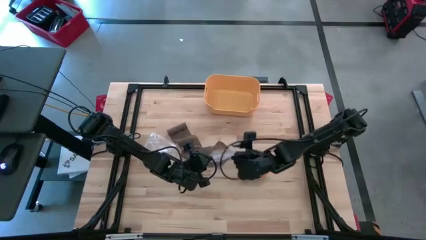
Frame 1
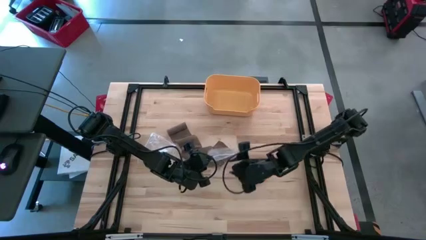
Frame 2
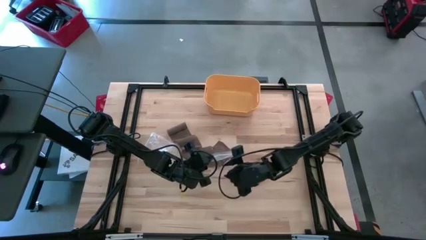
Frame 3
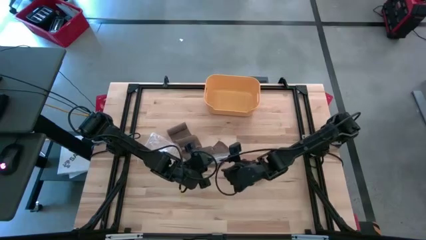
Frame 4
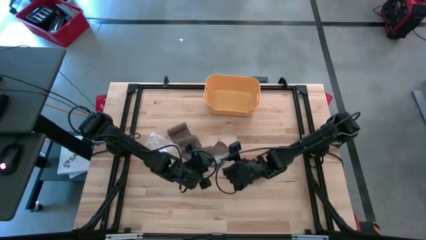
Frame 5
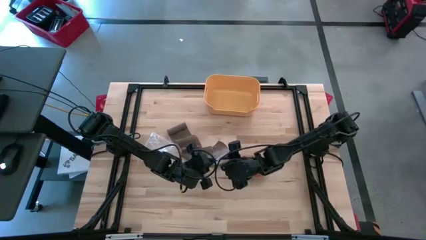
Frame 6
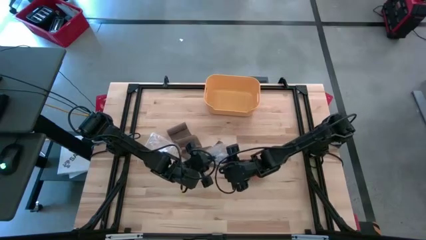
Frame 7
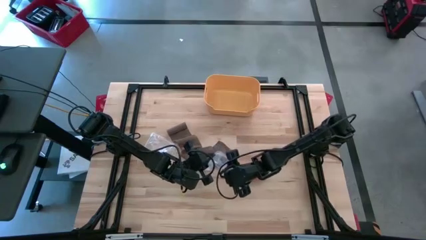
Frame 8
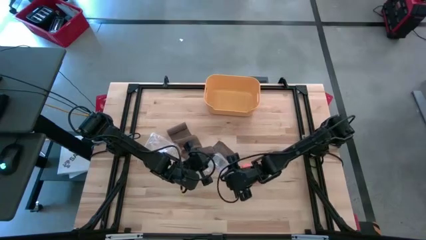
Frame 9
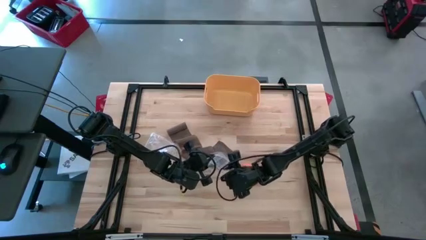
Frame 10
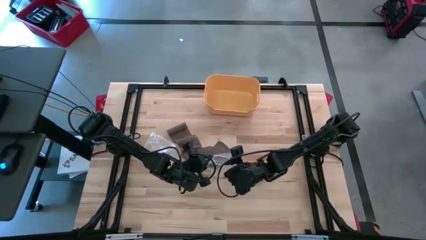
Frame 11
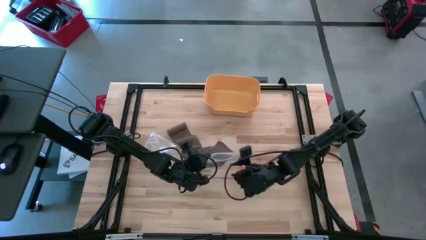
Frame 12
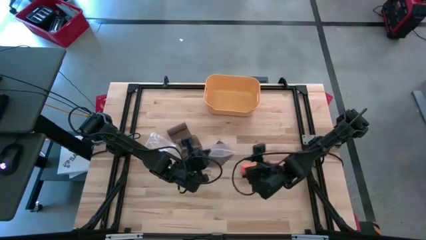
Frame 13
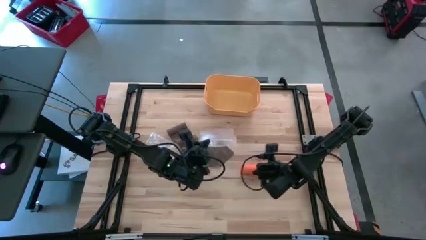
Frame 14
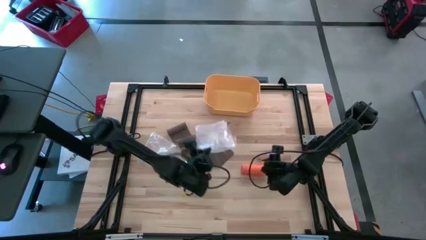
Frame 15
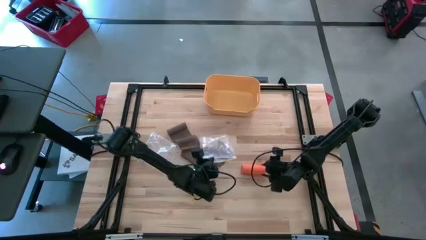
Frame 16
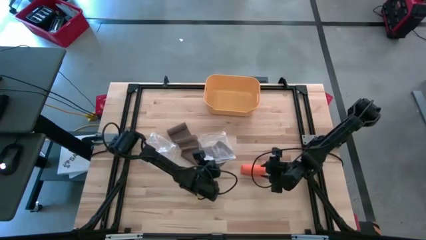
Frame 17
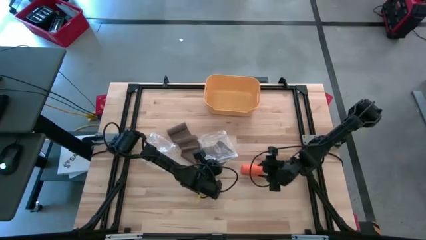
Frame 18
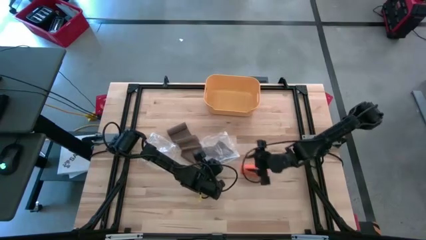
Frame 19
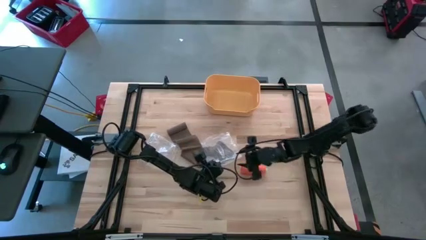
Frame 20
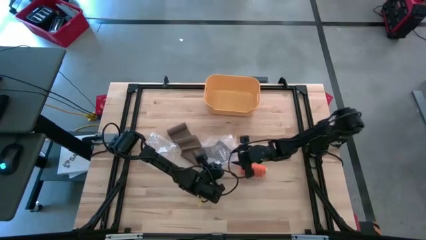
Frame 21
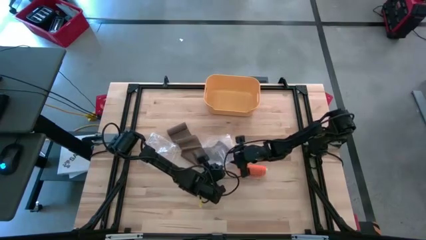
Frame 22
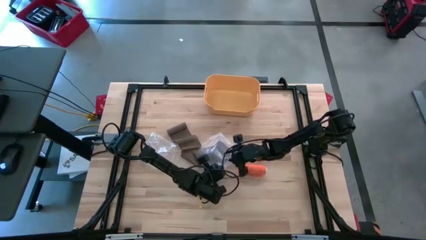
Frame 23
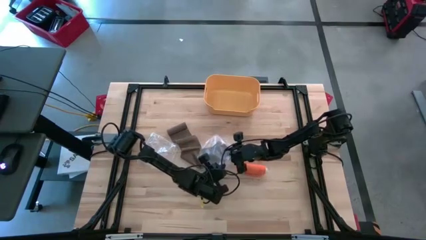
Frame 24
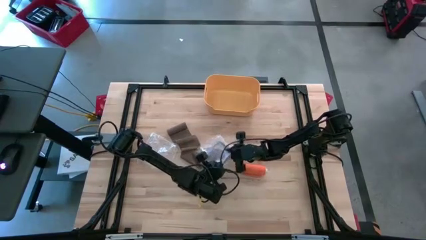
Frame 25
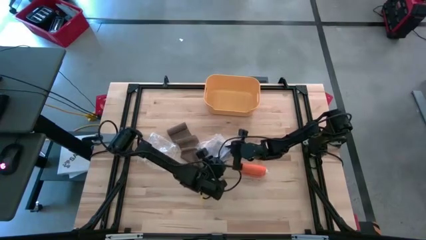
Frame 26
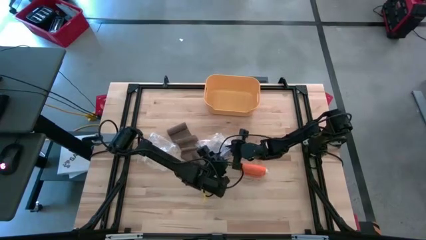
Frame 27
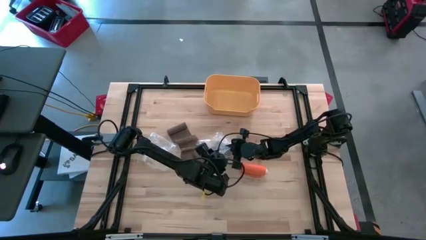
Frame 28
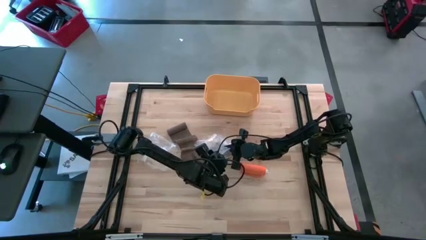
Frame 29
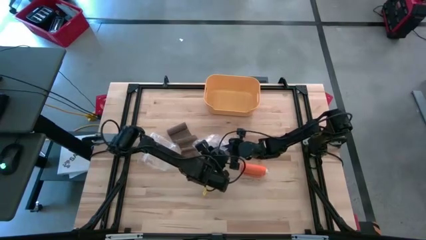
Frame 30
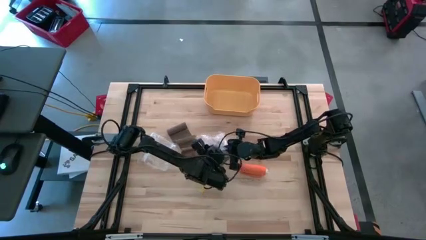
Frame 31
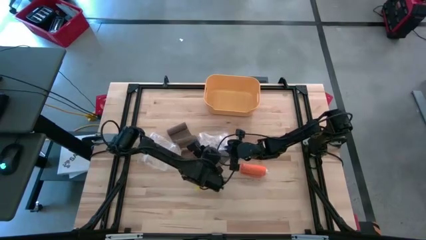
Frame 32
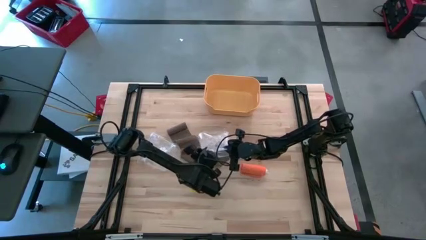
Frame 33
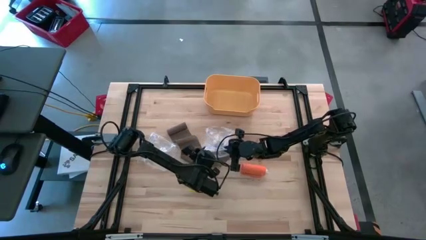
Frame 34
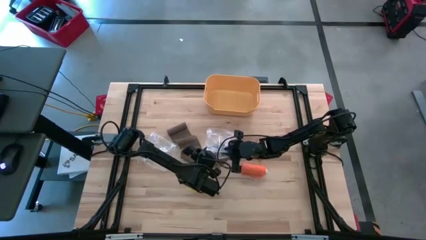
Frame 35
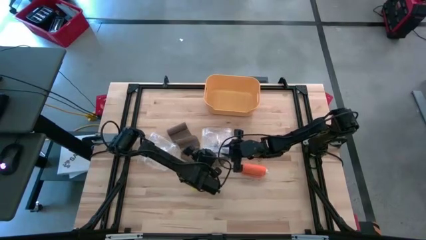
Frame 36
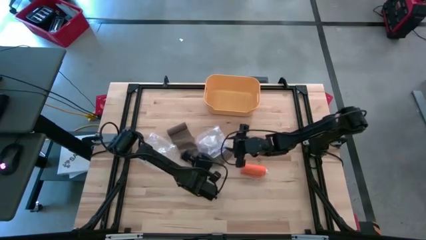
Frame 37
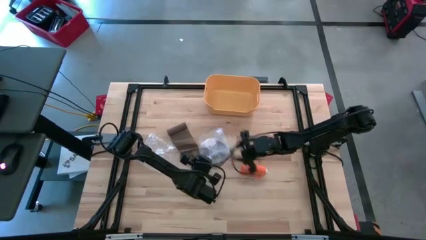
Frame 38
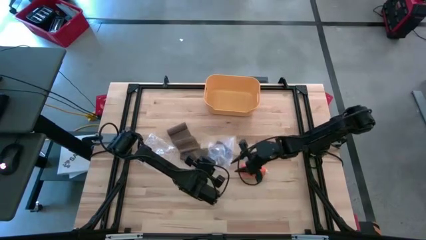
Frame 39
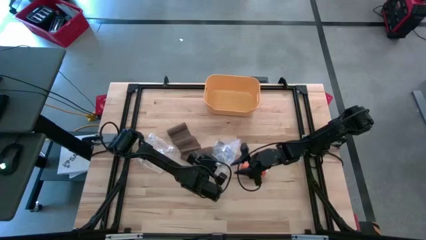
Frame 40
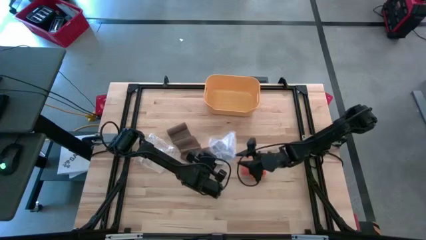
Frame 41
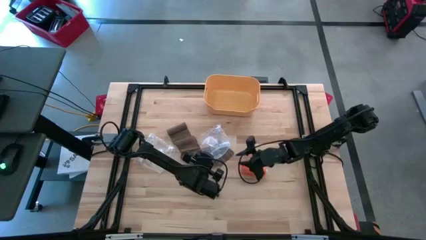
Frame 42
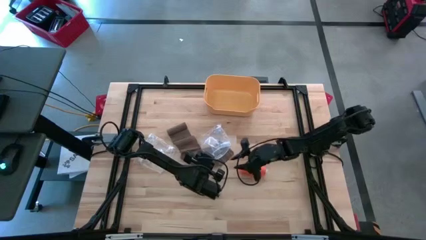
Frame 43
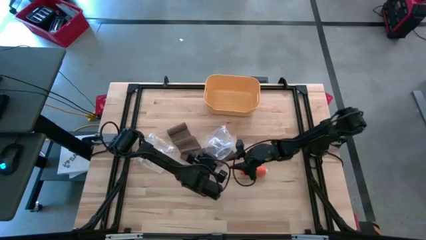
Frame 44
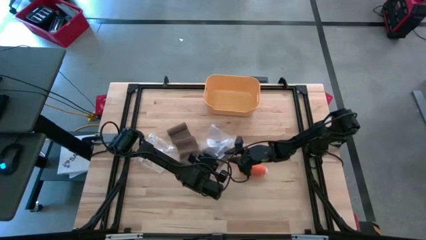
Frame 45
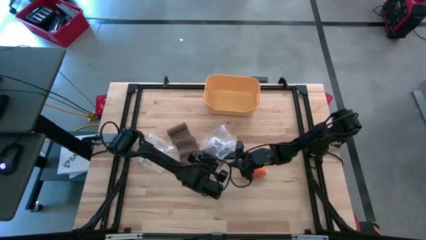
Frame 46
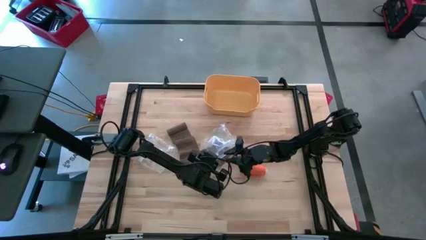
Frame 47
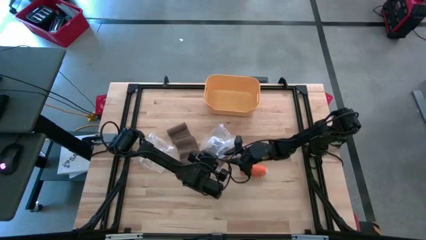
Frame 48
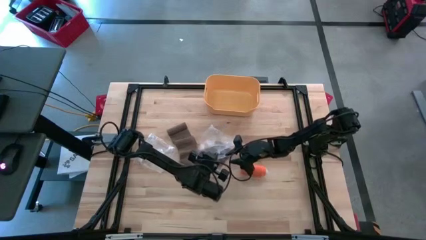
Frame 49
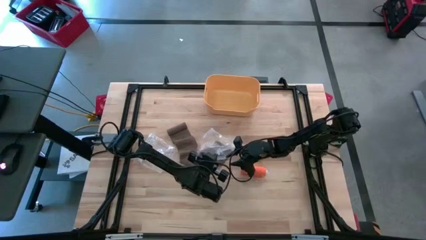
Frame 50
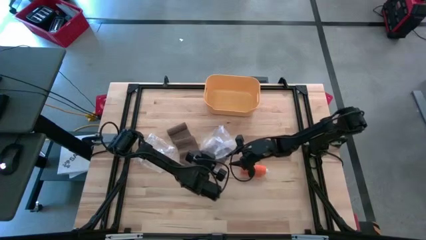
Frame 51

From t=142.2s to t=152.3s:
Task: Roll bandage
Open the bottom transparent zip bag

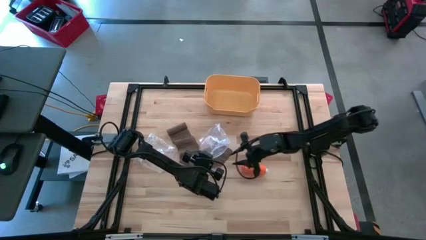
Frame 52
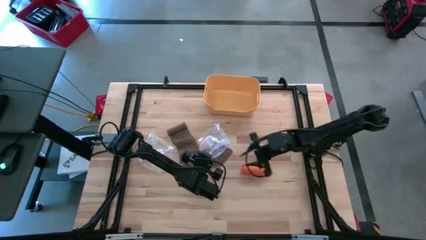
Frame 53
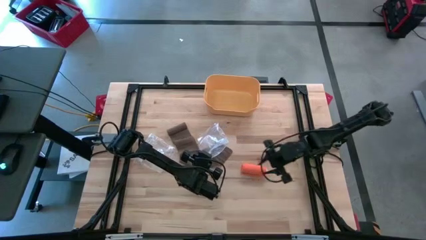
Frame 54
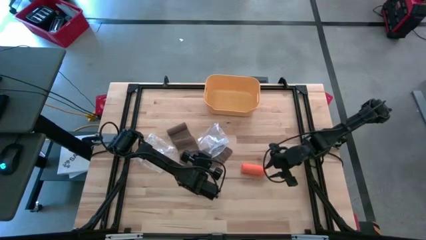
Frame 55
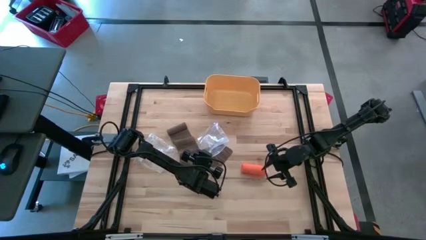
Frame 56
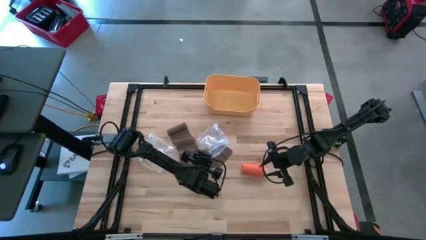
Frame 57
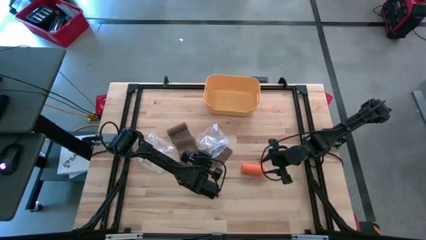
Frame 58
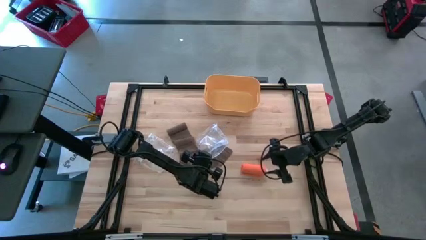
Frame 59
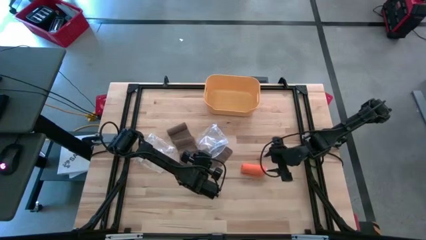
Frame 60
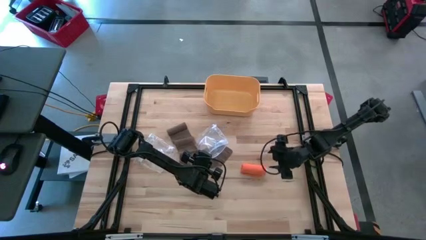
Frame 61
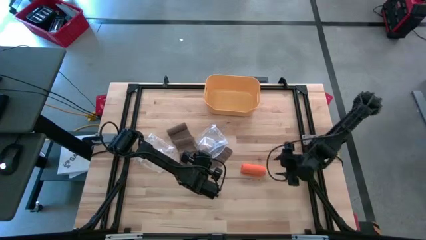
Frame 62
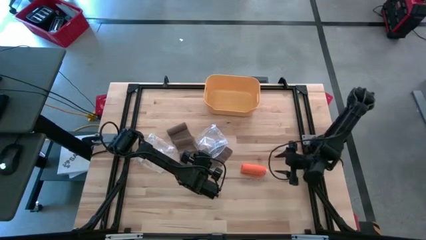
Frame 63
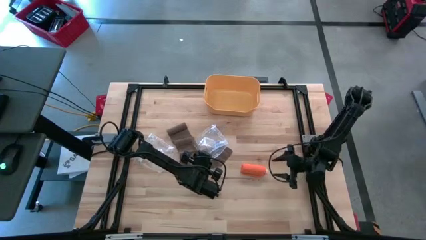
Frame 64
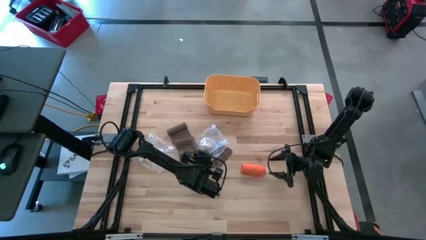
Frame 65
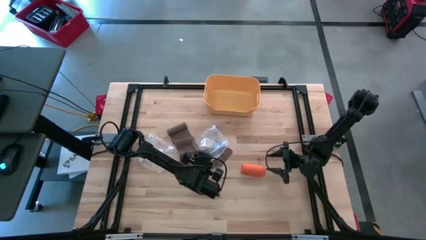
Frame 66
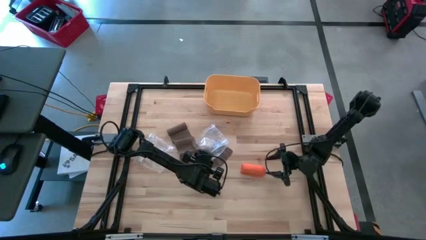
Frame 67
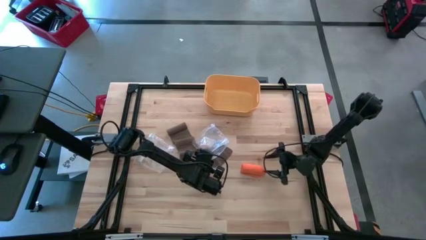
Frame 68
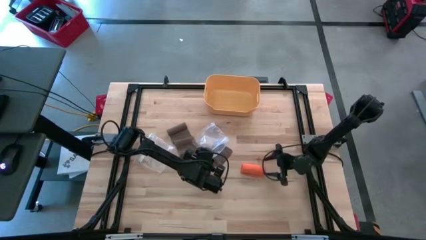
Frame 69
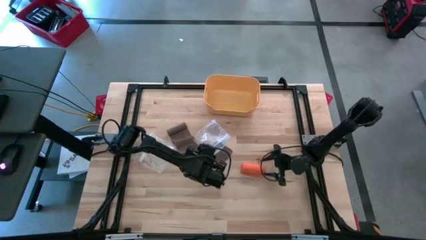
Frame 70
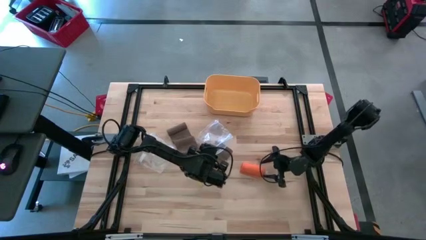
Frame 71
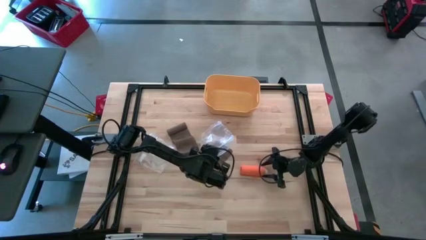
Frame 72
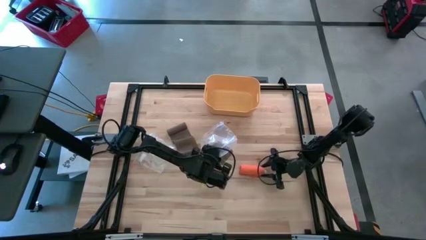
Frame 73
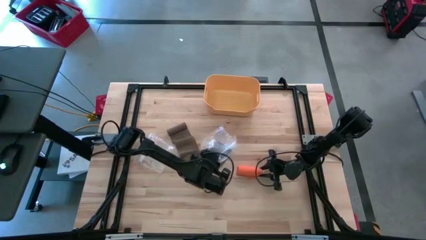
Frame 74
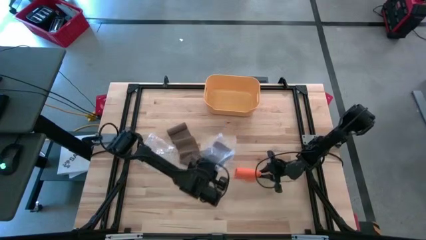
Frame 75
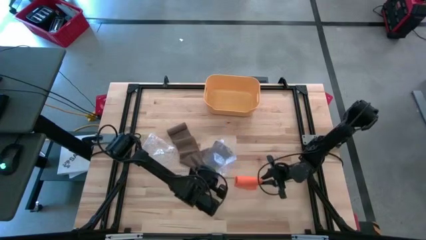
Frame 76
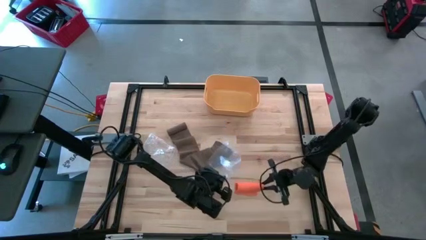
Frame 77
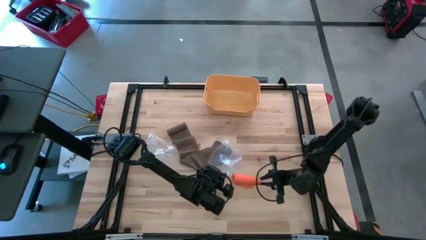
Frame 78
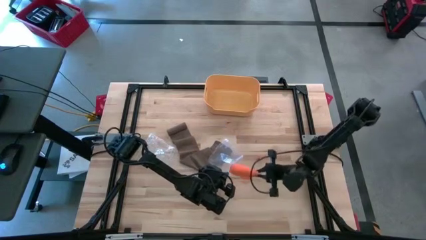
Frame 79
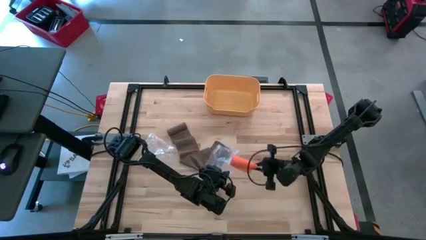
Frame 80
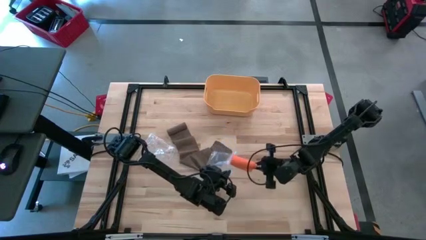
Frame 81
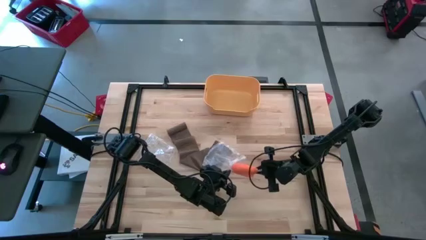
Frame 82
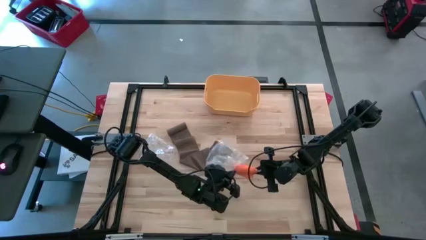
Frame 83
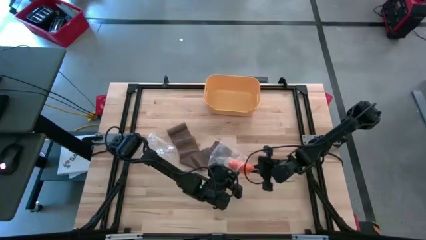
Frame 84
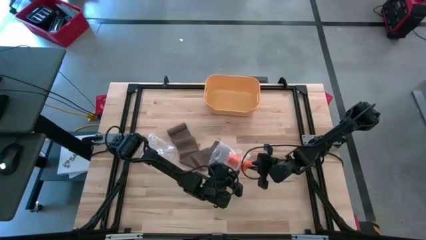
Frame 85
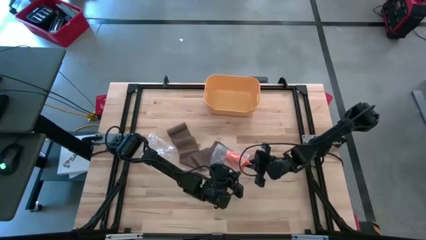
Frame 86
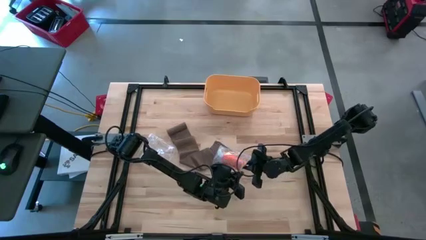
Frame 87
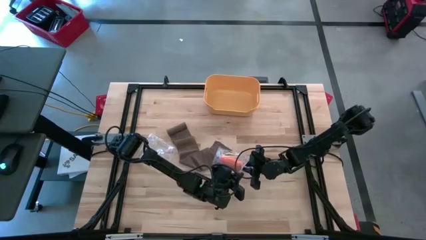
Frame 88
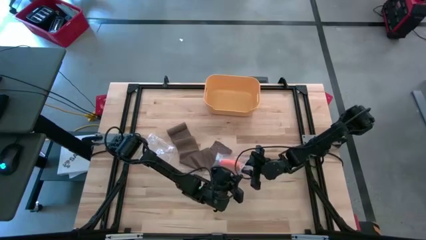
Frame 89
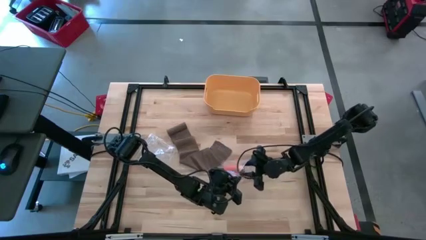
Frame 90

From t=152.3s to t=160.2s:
Put the orange bandage into the bottom transparent zip bag
